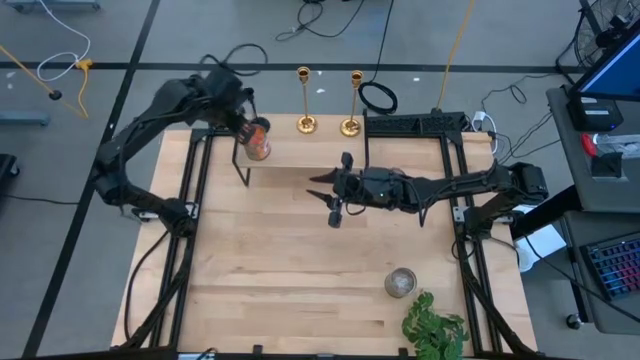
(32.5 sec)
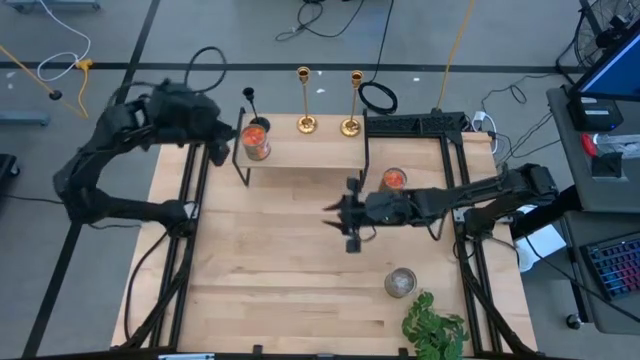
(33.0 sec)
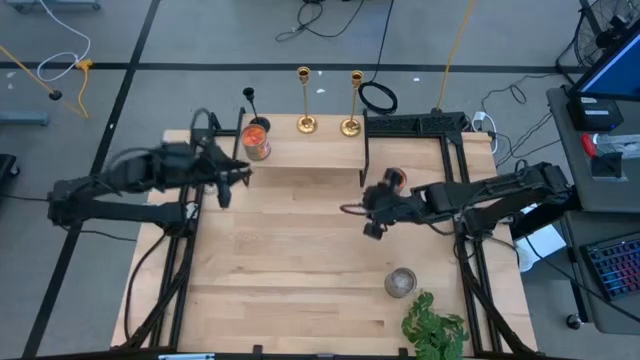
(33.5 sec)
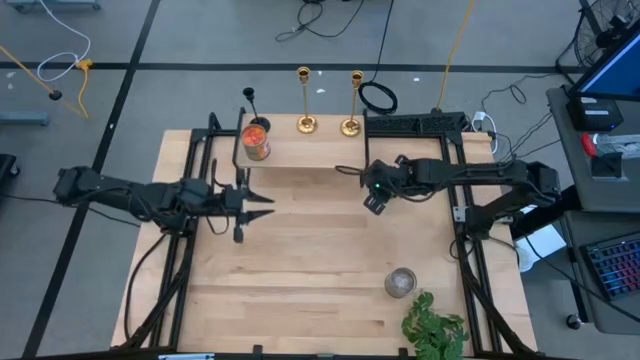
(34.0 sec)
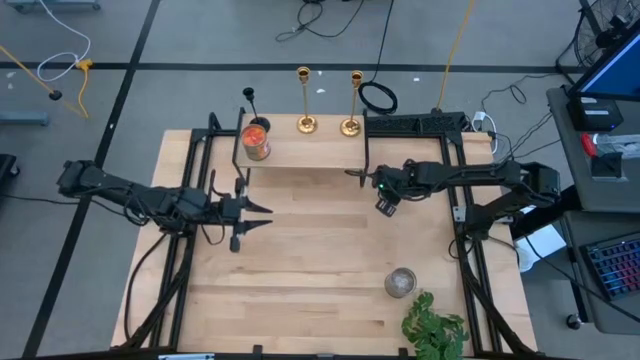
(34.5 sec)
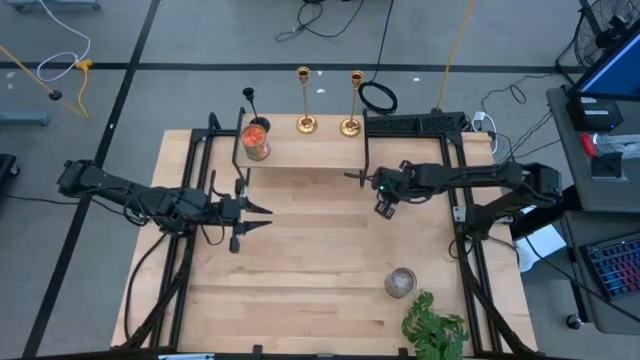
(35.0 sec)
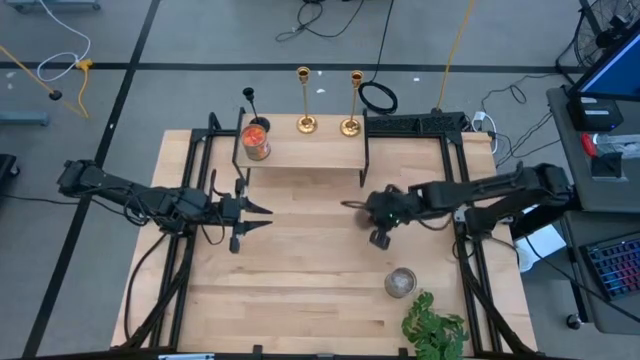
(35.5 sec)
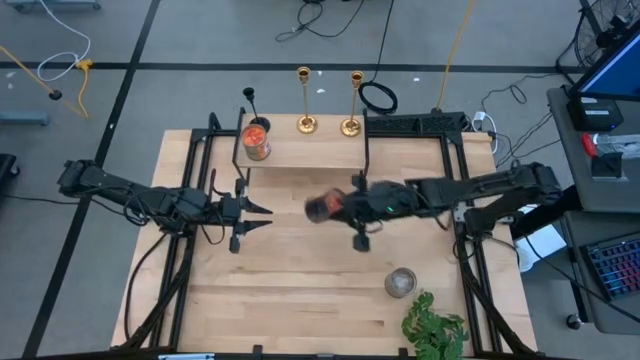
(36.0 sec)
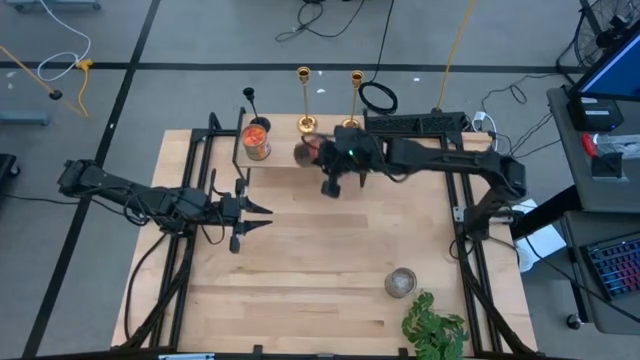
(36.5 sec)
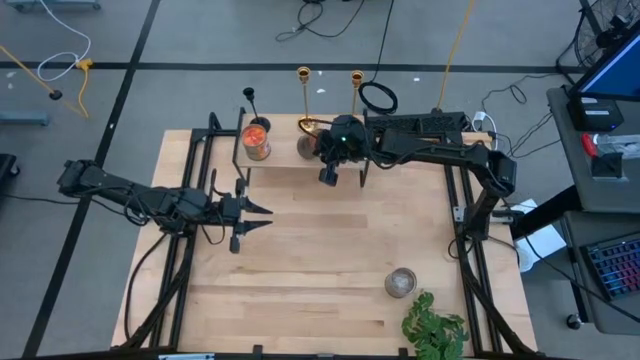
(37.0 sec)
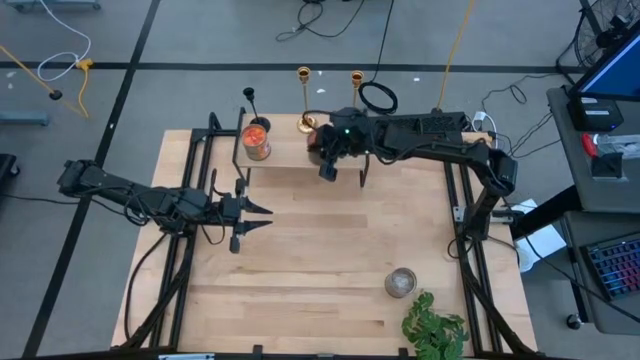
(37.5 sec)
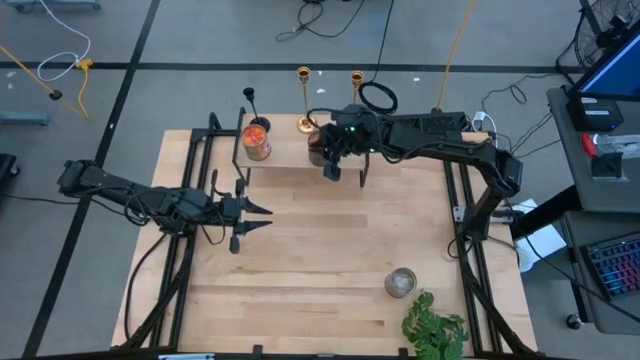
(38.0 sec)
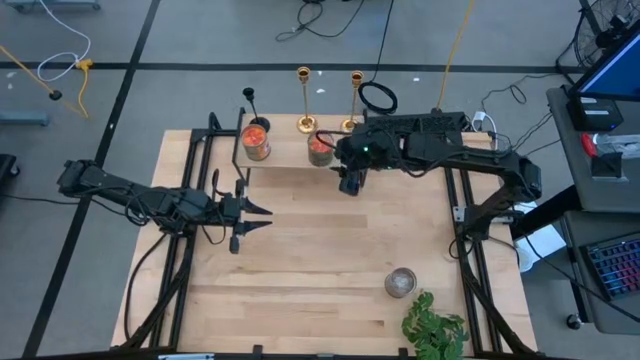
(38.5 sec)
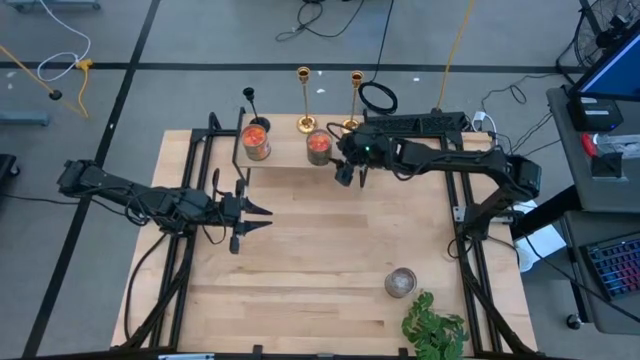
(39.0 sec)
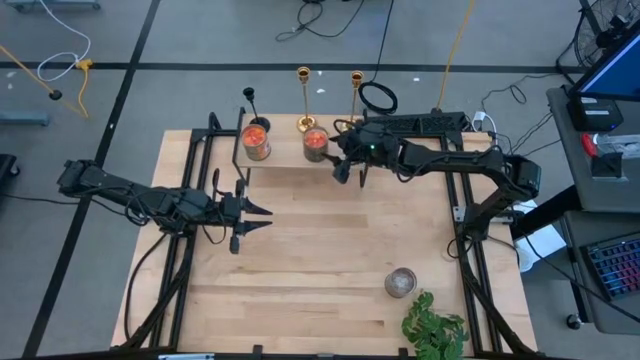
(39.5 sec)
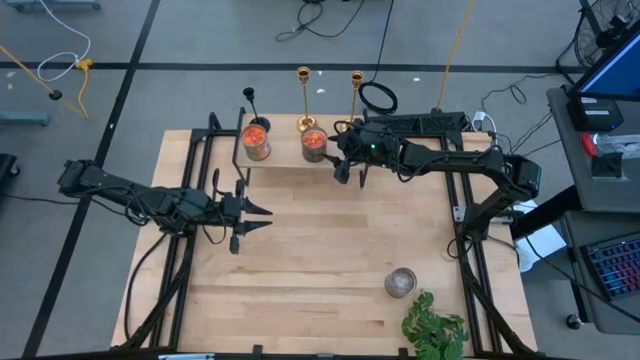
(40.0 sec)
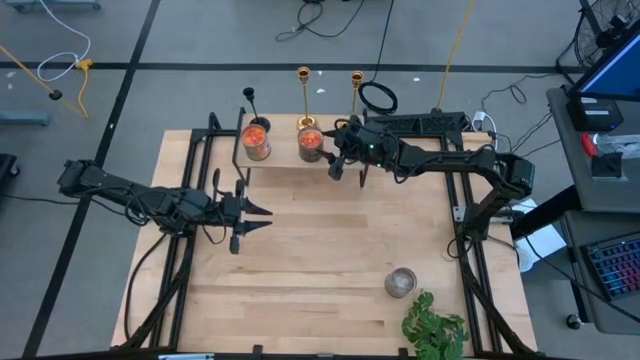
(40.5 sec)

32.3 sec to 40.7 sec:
Task: Pick & Place candle stick holders
Put the top silver scented candle on the shelf

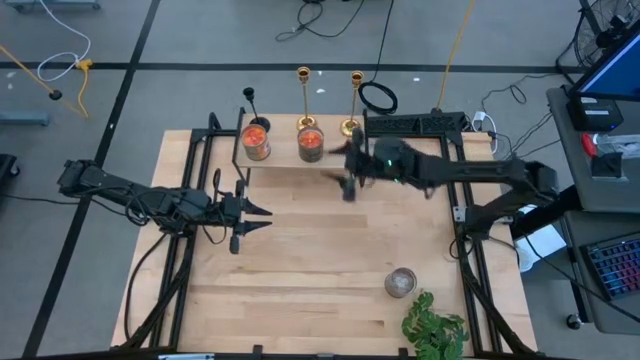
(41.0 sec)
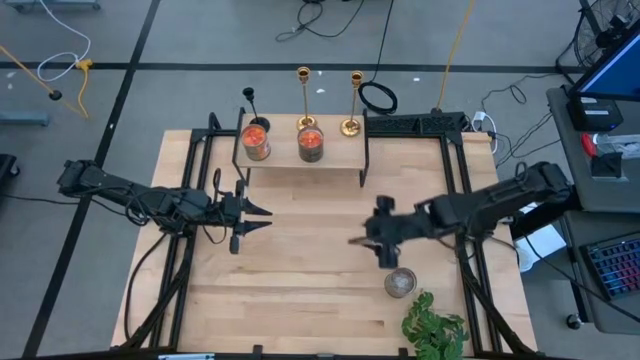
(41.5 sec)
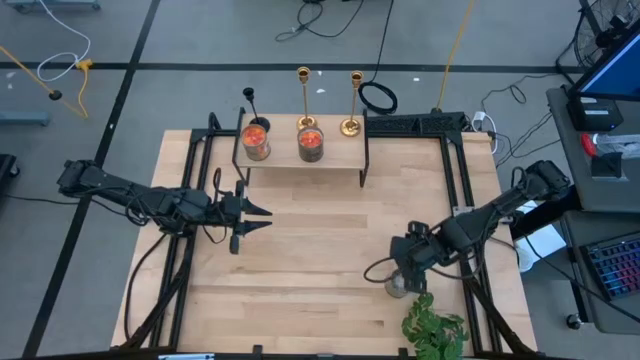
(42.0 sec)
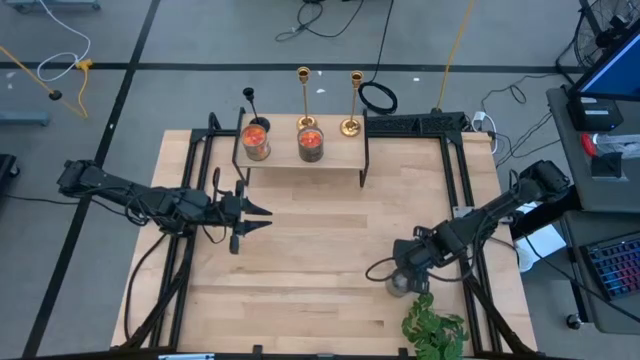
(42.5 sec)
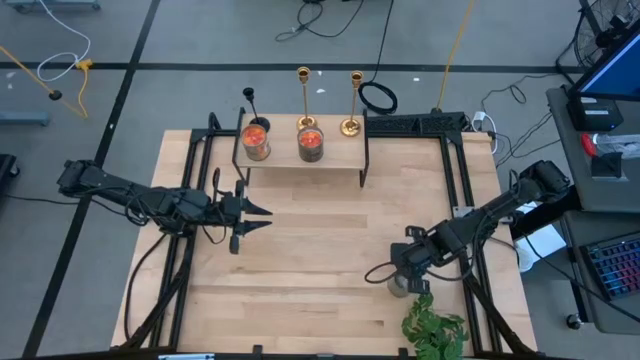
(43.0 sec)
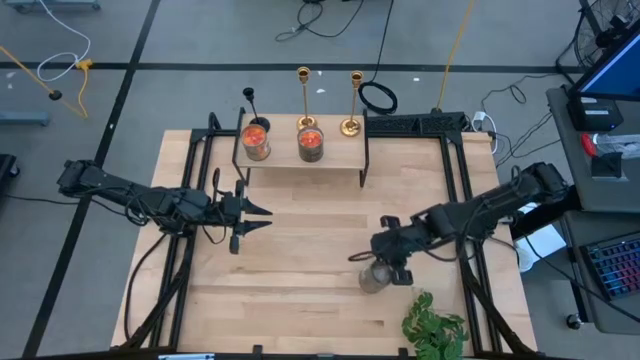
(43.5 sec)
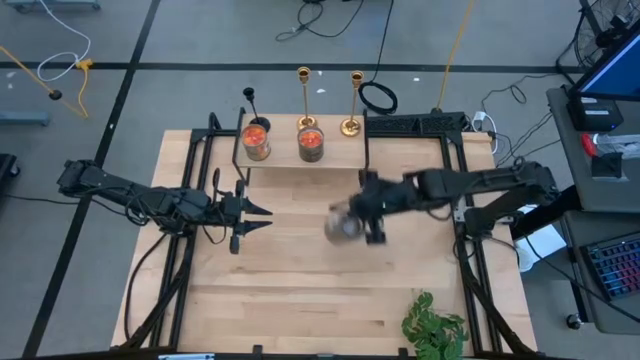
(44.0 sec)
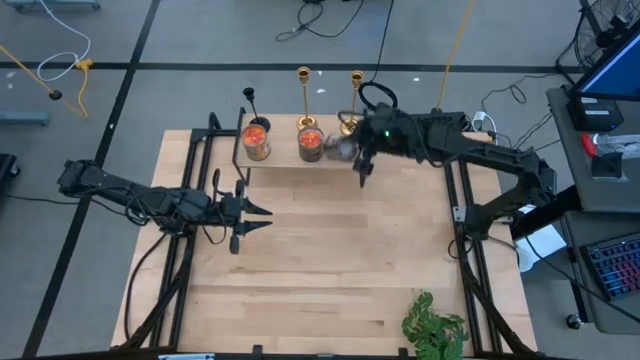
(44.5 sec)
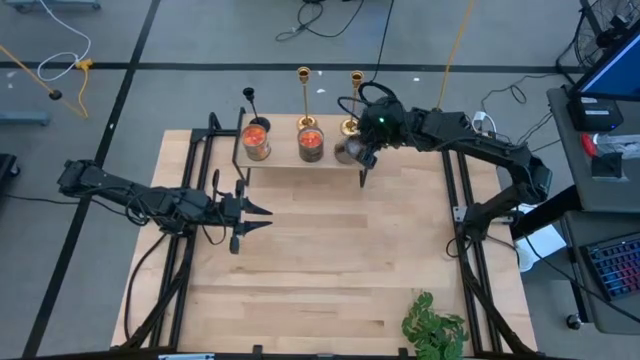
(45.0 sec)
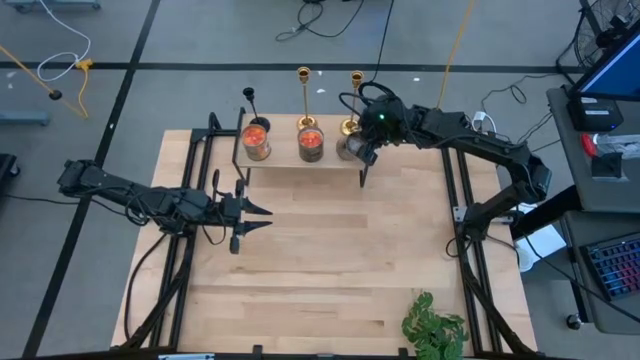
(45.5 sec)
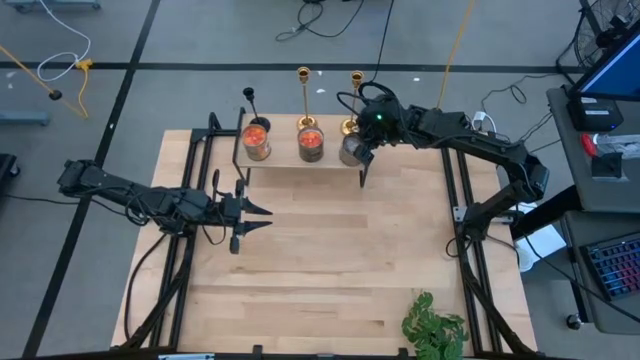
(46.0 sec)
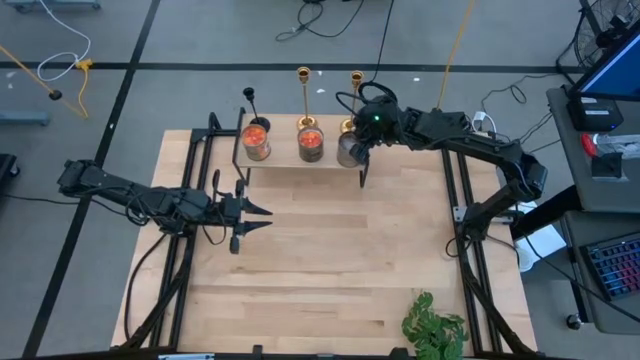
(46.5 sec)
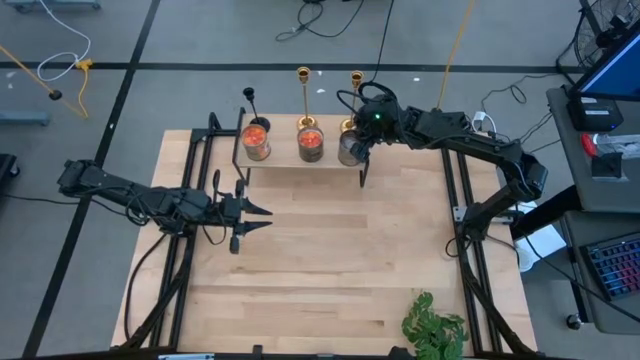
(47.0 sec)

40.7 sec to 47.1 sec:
Put the silver scented candle on the shelf

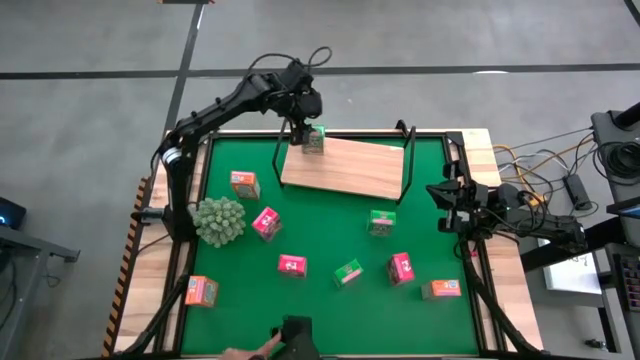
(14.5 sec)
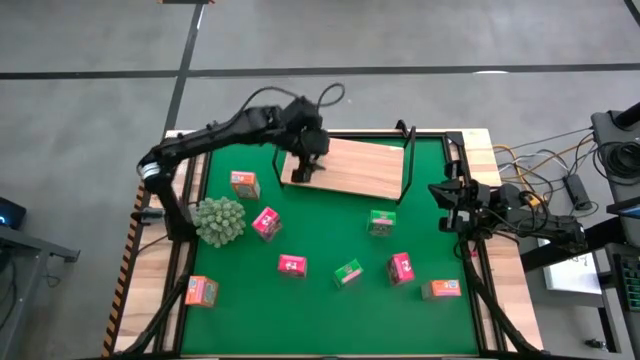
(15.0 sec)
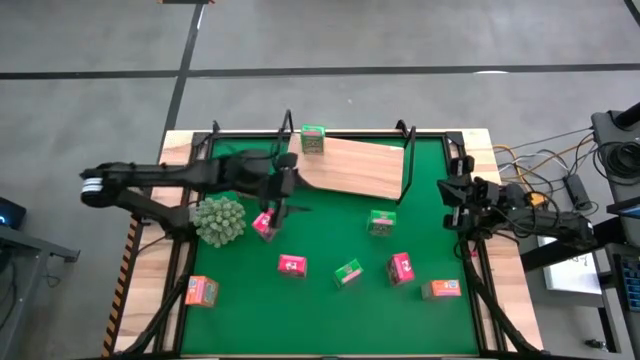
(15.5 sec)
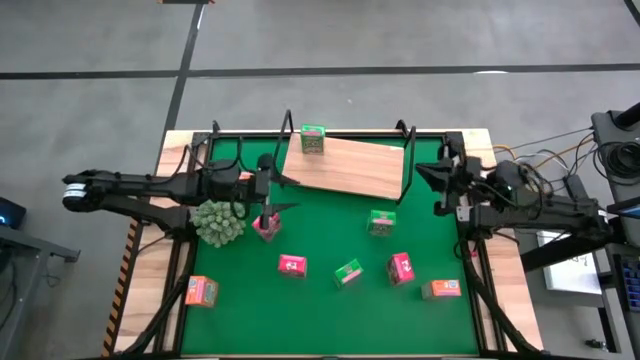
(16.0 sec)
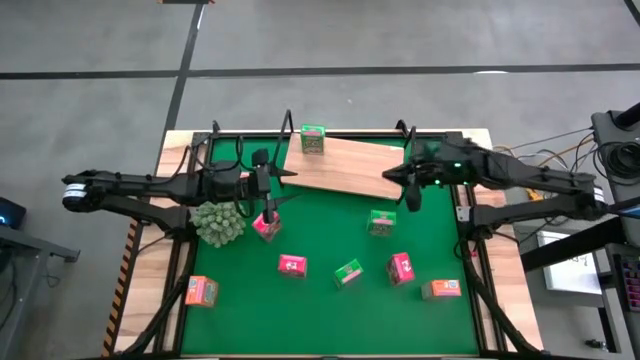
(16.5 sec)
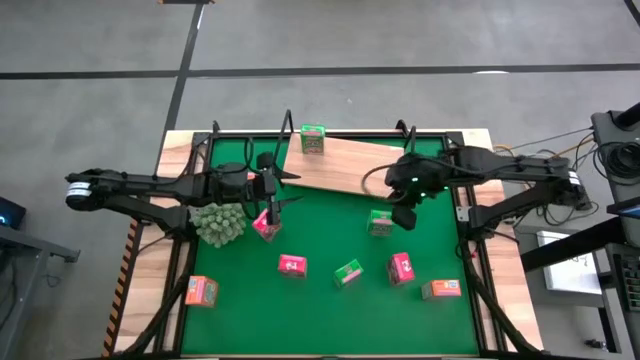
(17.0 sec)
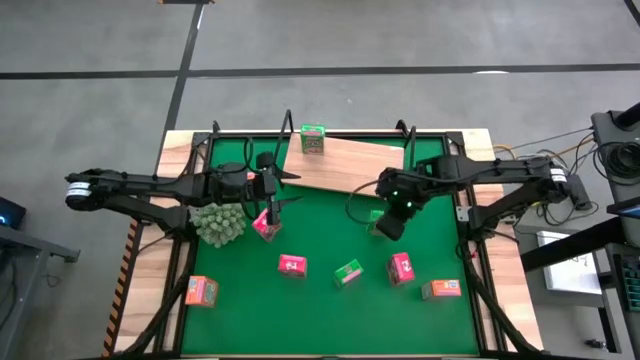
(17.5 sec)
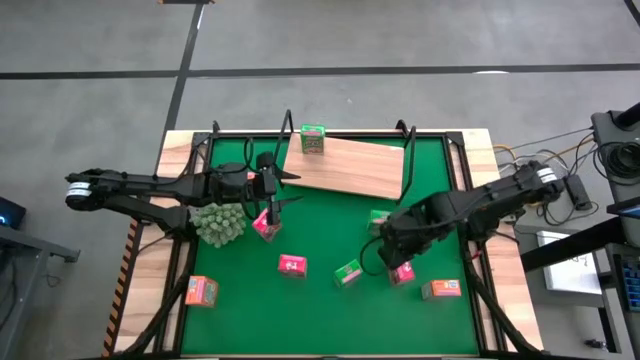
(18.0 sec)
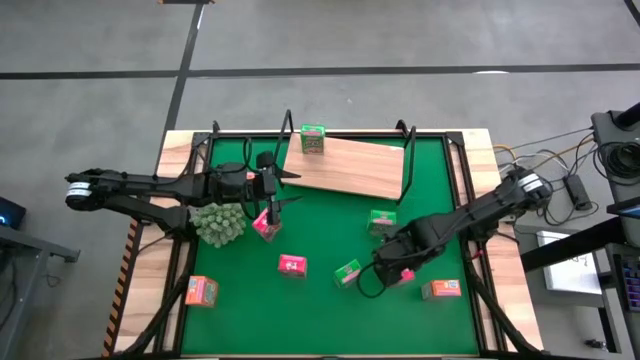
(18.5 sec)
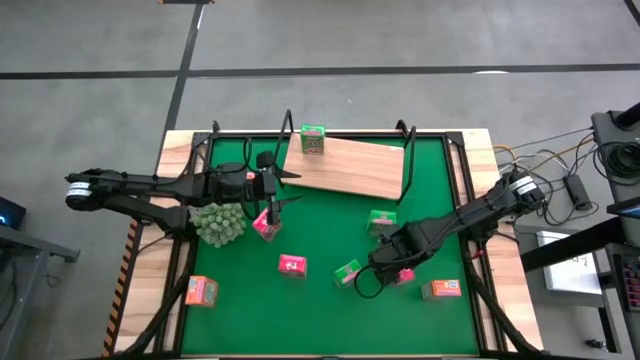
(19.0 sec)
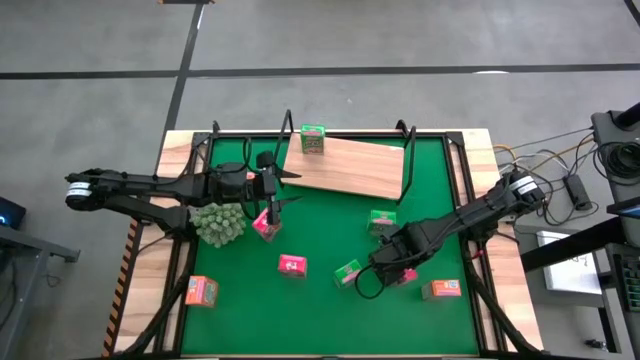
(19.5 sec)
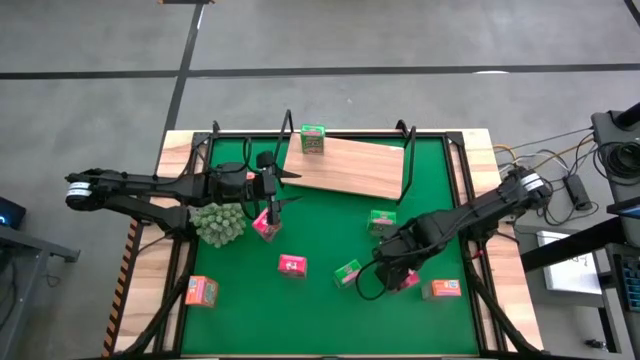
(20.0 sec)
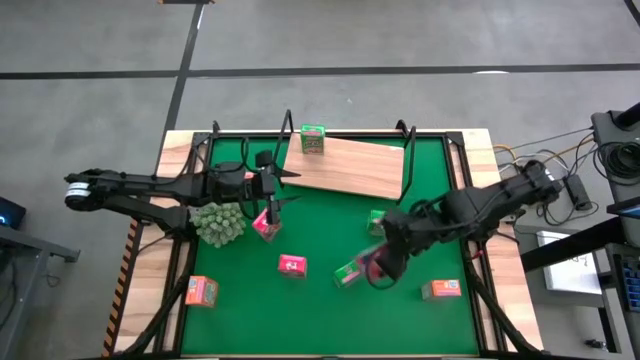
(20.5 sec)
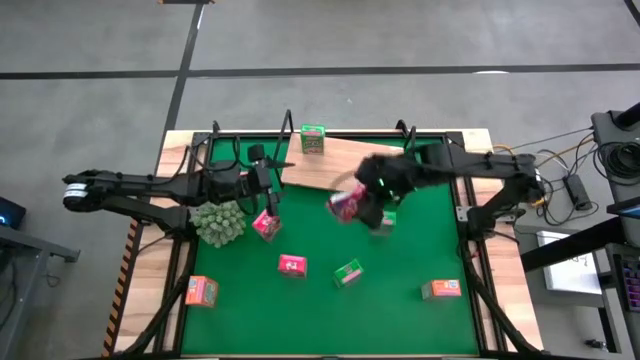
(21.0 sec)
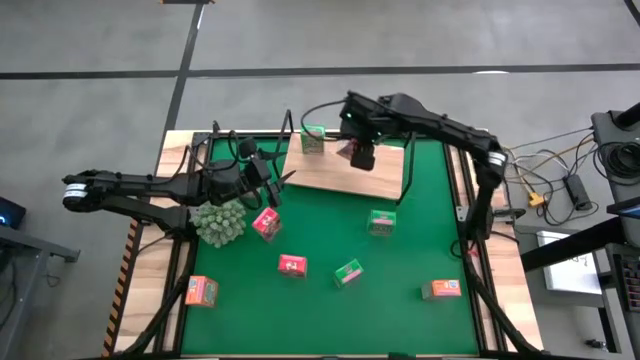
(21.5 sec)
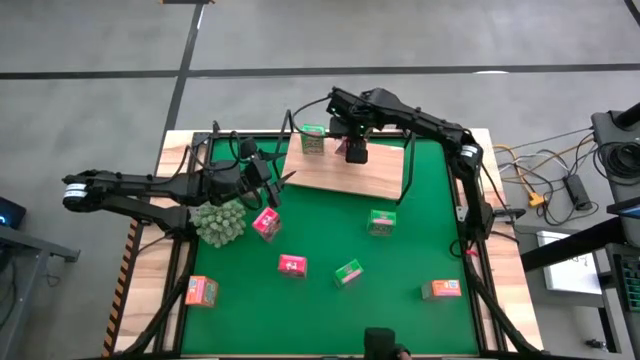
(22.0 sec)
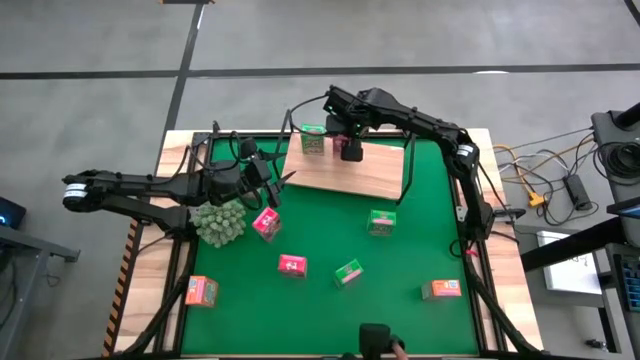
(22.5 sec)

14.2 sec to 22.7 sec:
Task: Stack cereal on shelf
Put the bottom right red cereal box on the shelf
